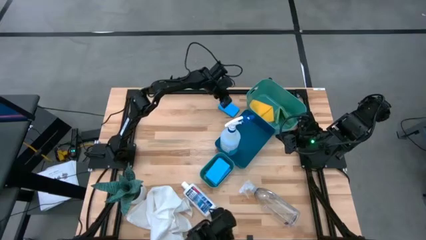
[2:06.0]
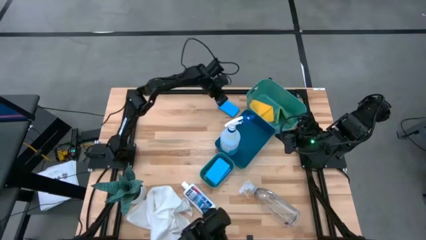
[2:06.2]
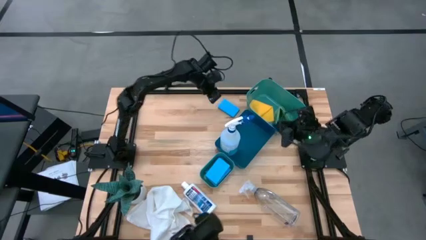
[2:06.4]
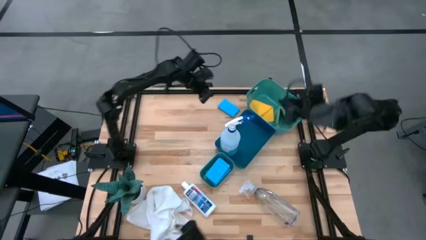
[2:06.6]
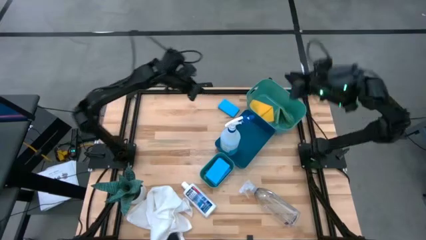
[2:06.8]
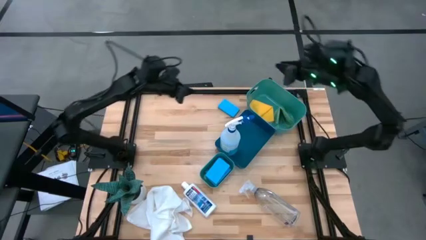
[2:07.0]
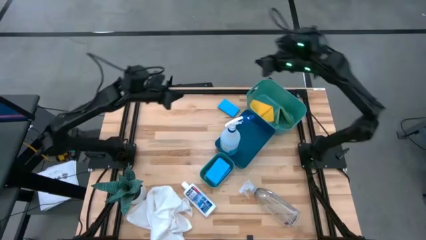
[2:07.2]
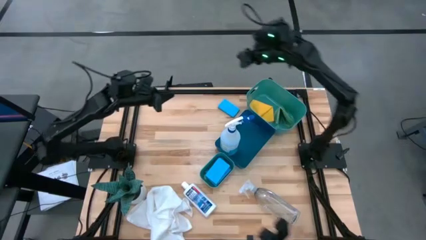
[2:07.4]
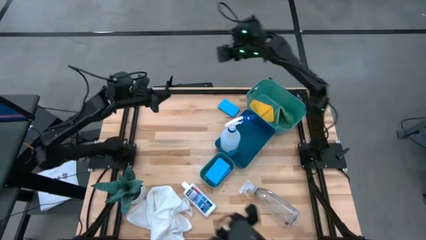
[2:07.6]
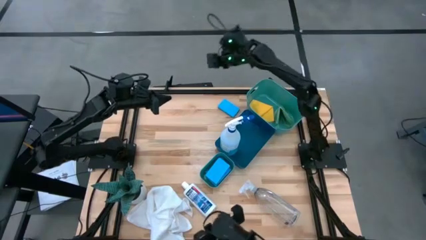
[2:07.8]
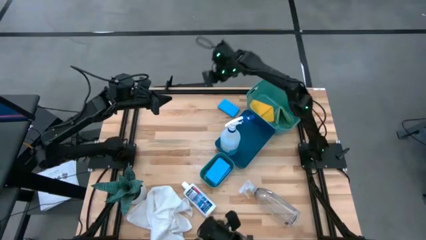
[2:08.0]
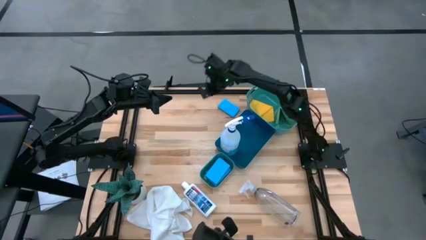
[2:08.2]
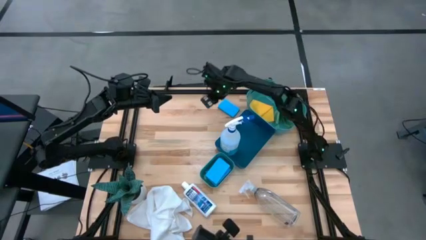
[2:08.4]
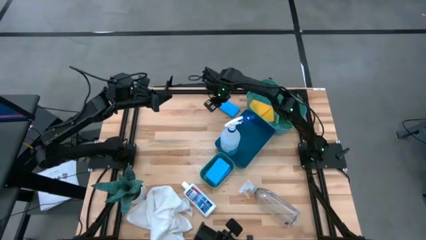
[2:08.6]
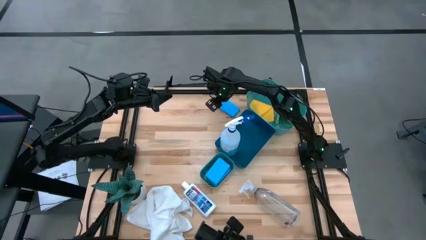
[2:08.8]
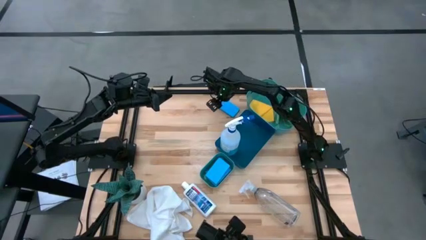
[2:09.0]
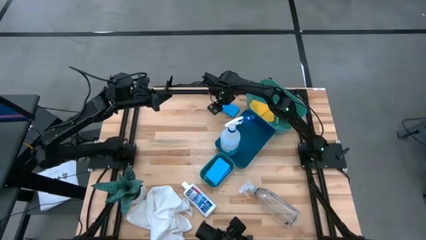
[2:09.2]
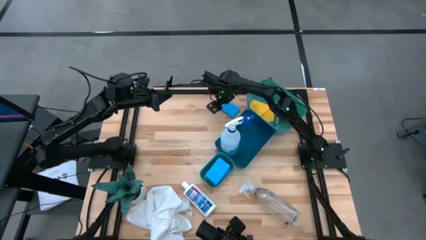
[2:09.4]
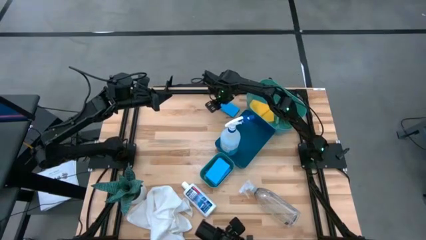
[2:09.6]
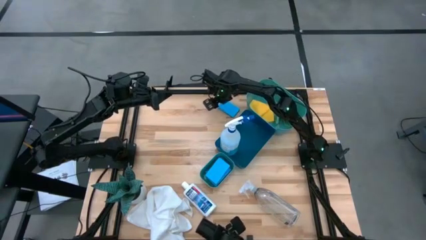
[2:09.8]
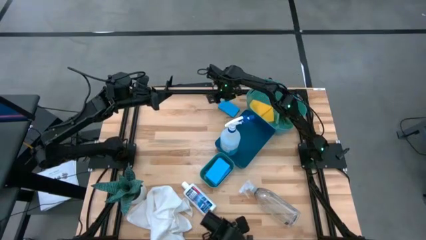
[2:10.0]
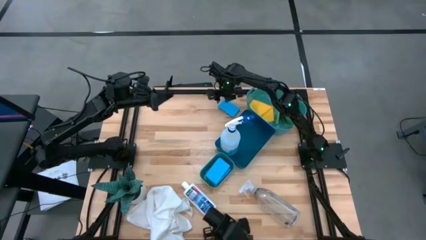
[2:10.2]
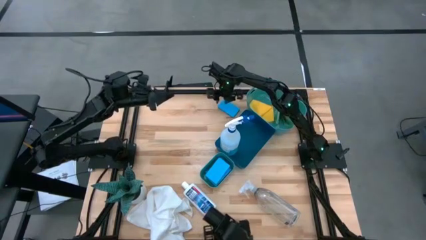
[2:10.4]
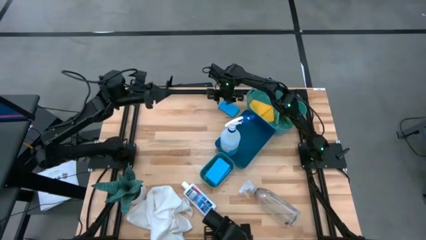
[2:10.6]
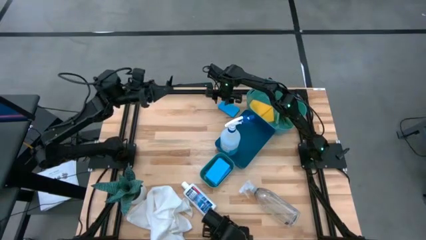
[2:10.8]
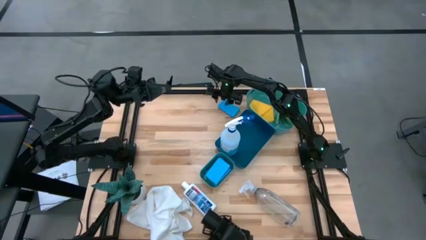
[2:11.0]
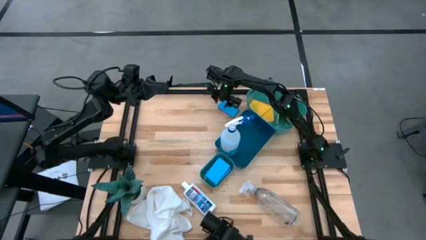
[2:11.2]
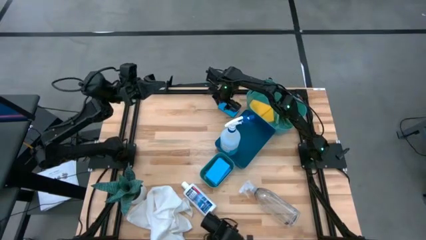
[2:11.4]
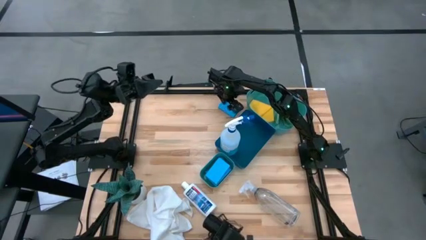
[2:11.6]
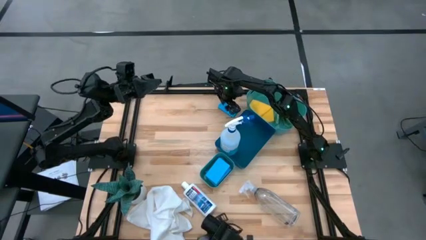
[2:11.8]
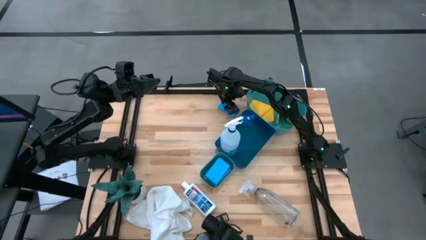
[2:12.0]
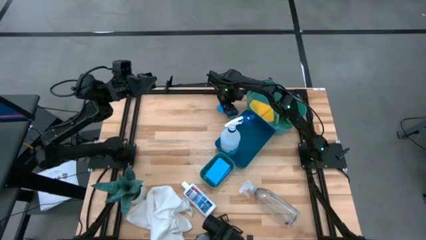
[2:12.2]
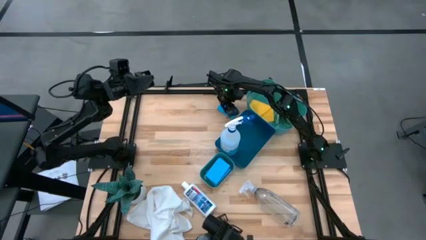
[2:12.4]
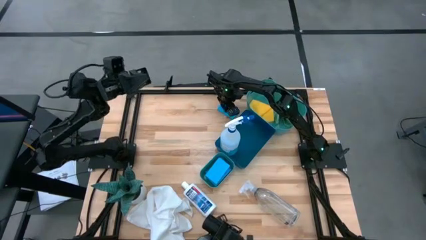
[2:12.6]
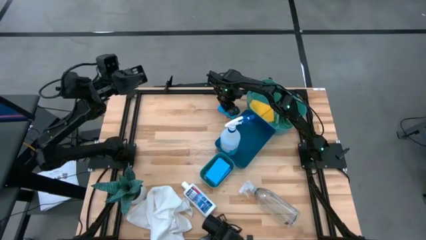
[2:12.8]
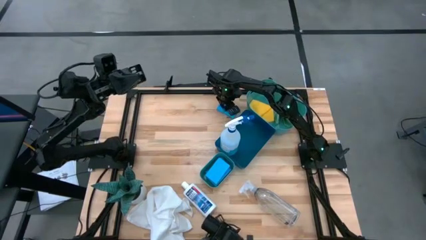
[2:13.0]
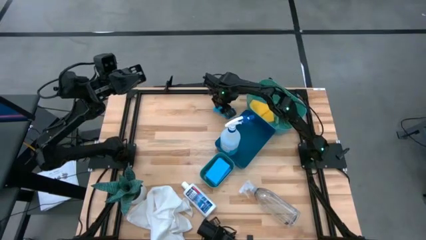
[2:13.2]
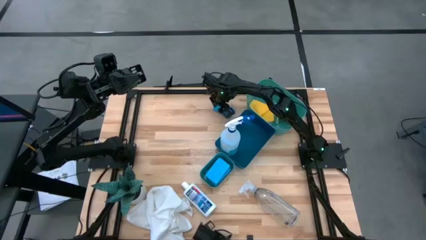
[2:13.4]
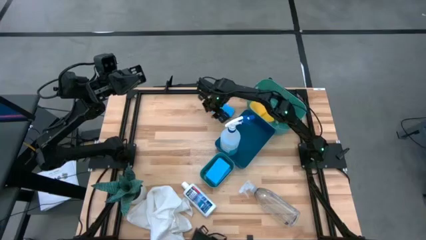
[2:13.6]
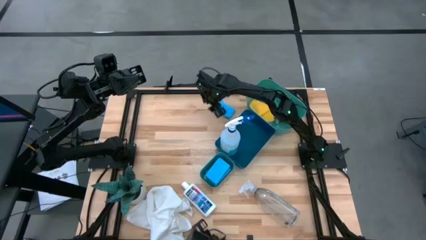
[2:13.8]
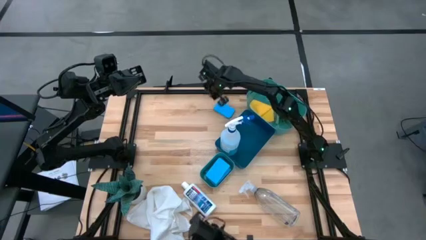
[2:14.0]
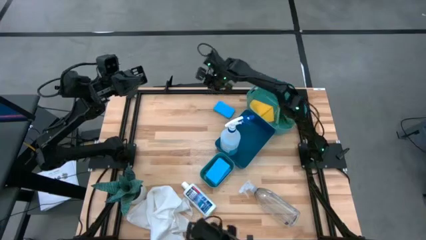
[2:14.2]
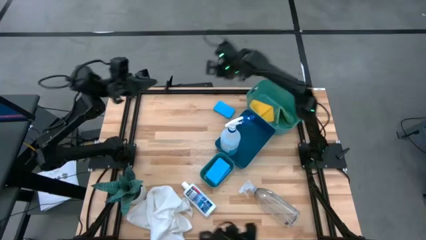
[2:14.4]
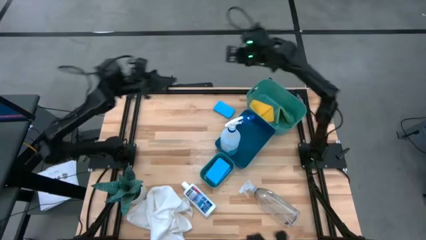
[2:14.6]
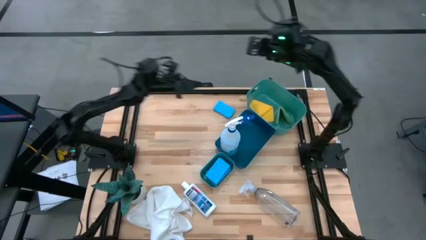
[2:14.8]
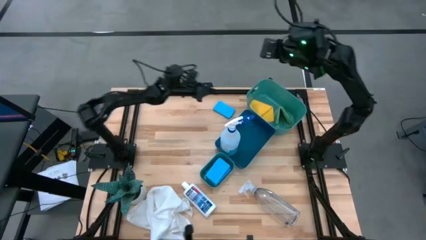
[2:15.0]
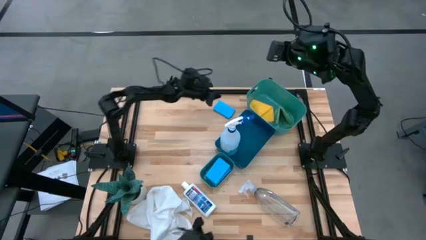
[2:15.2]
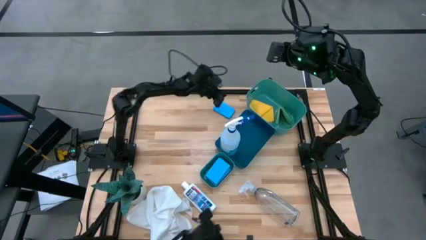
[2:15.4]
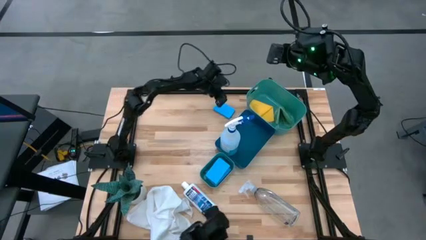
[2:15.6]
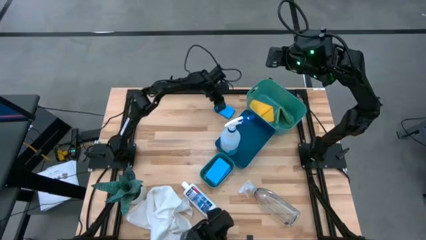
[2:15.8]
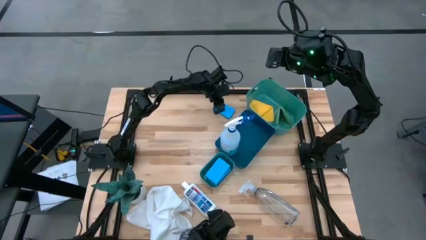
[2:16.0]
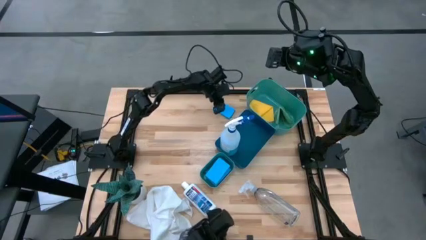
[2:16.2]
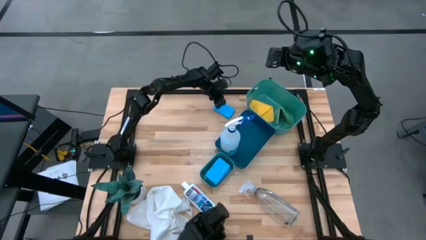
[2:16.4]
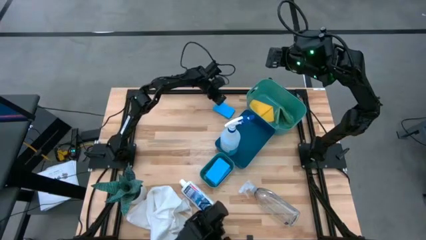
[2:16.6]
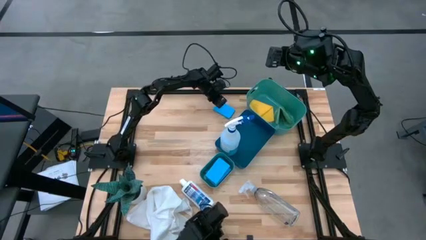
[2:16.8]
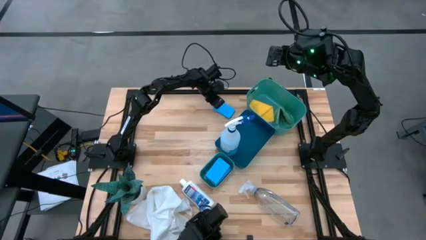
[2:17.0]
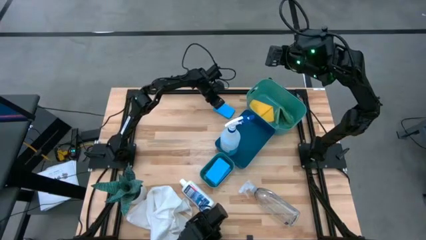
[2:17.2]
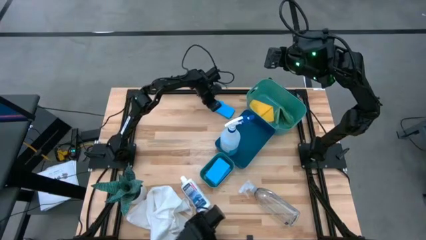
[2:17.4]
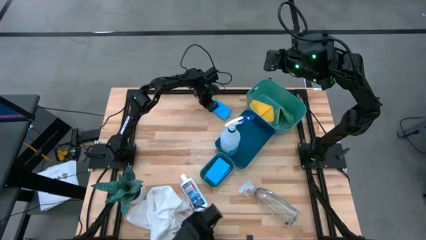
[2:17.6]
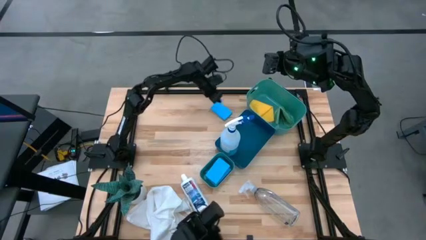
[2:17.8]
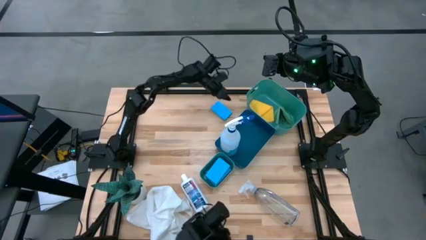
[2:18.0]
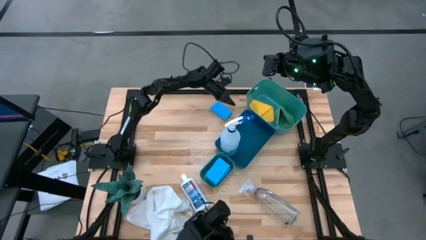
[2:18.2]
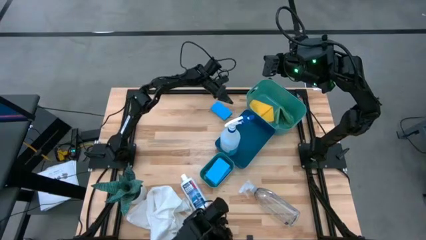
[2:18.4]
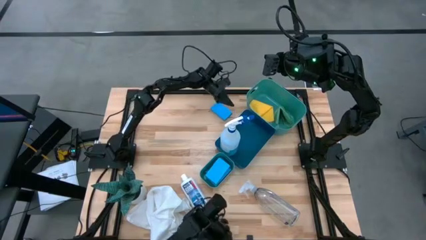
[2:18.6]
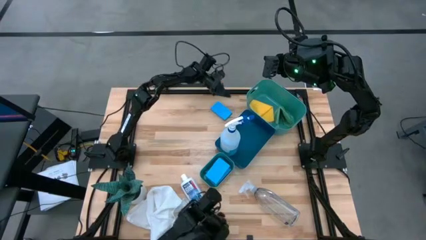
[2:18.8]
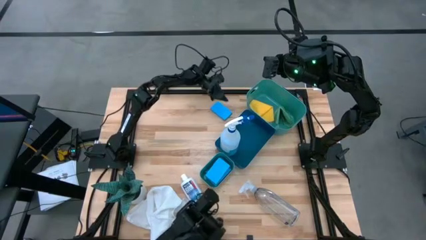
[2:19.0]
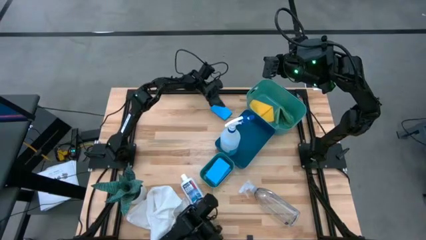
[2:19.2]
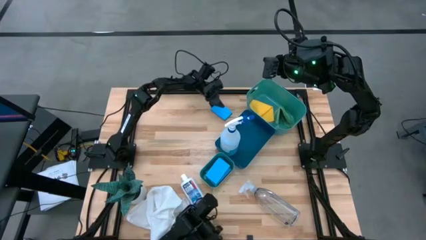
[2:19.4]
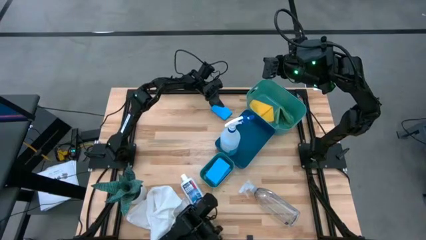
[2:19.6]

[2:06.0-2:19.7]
Task: Pick & Place Kitchen Items
Put the light blue sponge into the bottom green bin

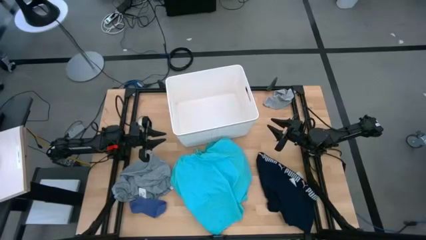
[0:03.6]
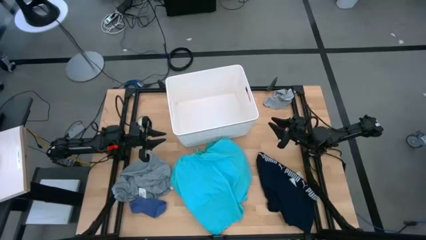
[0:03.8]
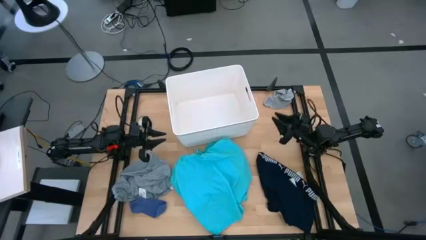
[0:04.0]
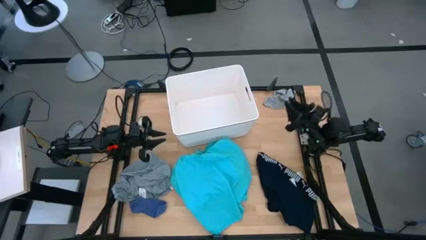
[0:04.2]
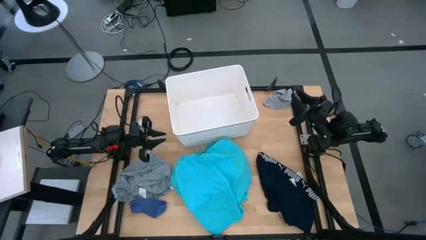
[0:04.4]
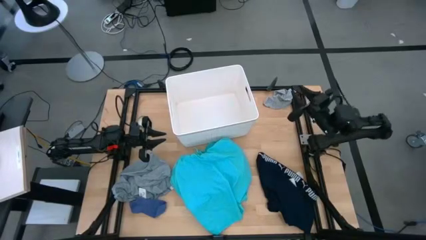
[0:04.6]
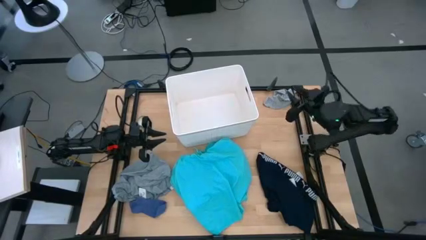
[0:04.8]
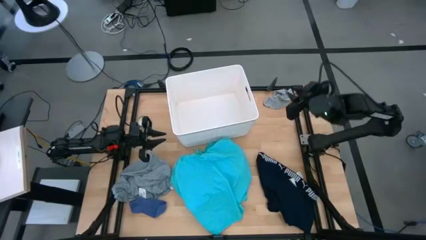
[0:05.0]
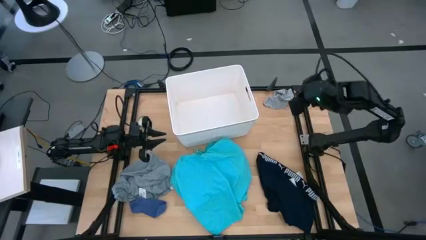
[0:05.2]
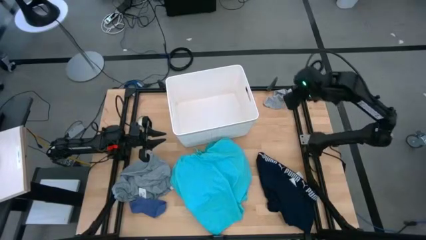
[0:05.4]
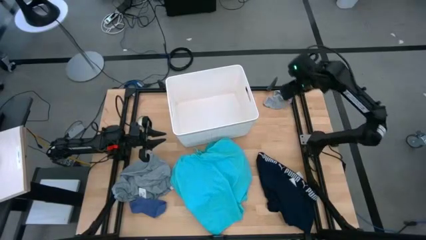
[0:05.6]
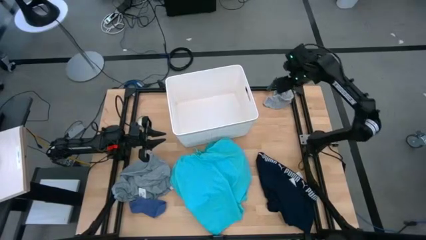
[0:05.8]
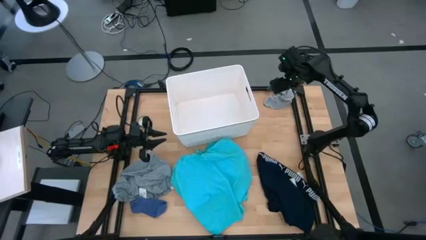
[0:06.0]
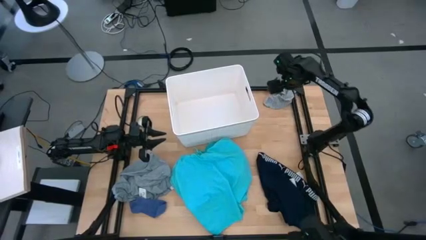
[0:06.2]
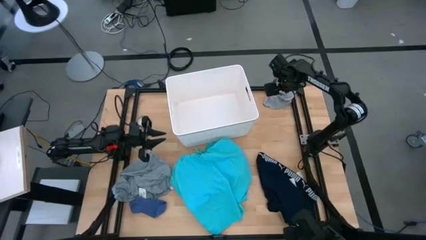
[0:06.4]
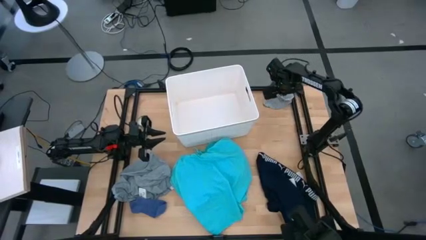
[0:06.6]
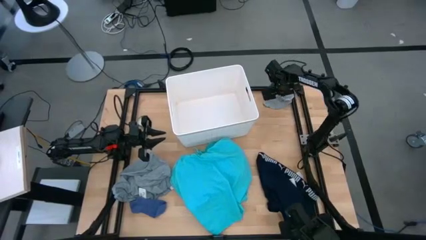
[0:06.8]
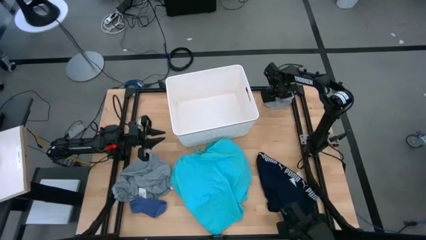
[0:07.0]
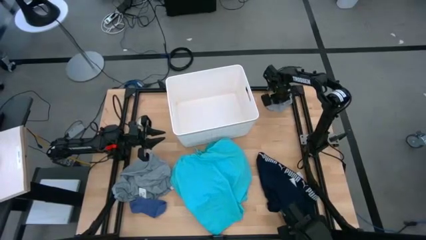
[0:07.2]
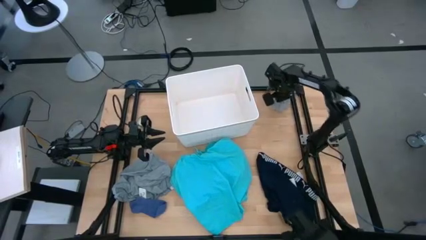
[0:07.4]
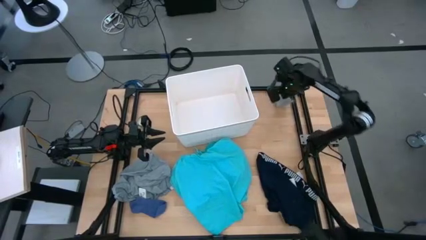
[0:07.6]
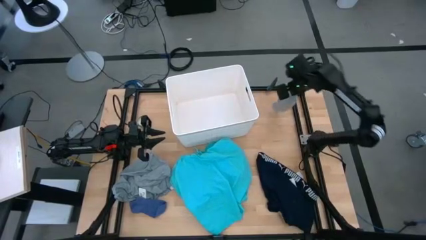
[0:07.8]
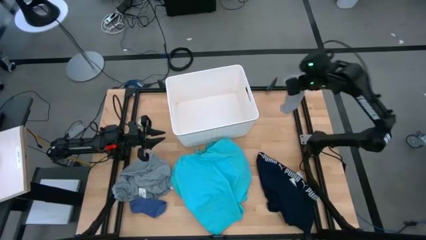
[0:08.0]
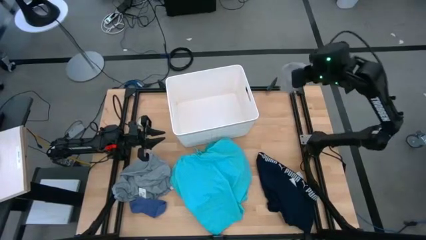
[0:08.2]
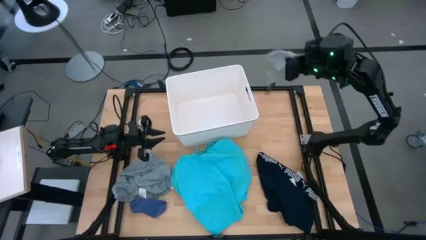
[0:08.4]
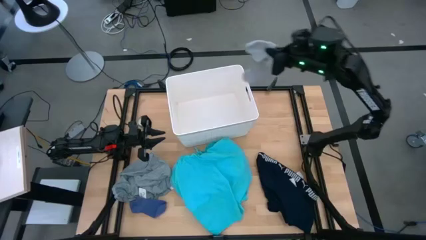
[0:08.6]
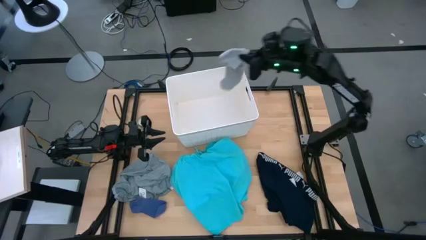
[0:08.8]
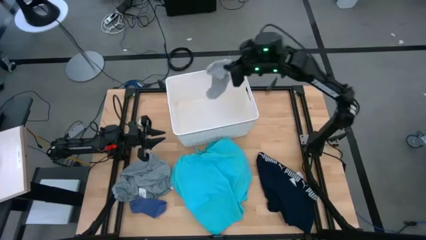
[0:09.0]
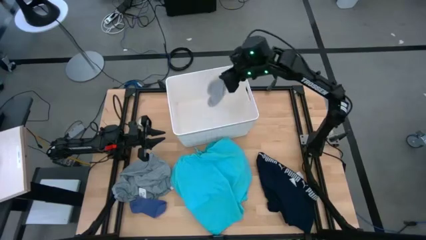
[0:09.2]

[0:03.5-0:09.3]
Task: Sort clothes
Put the gray sock into the white laundry bin
